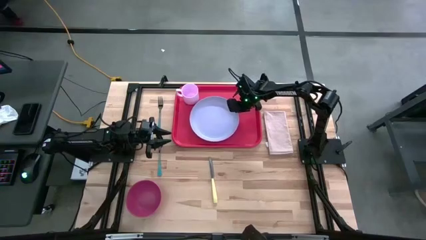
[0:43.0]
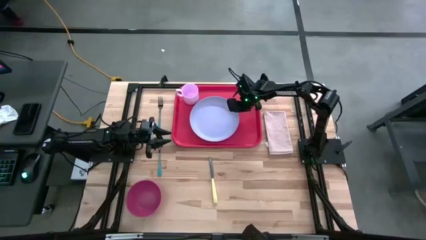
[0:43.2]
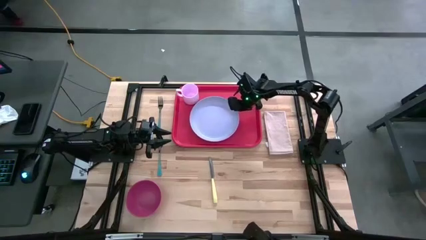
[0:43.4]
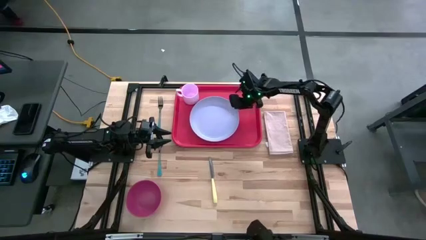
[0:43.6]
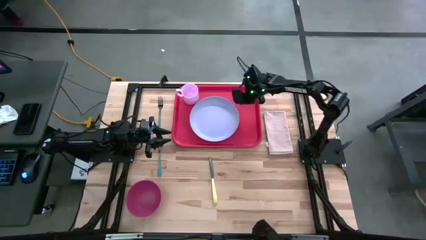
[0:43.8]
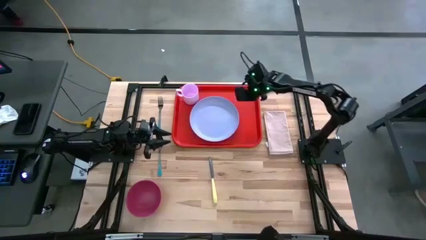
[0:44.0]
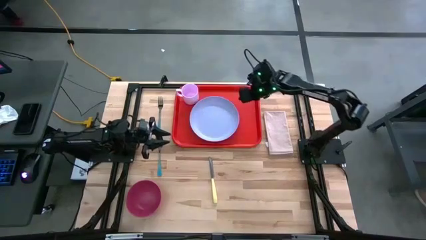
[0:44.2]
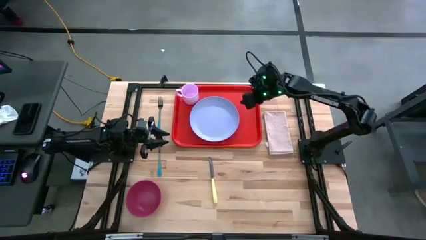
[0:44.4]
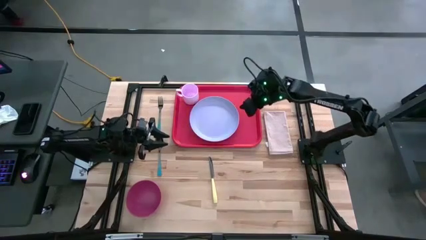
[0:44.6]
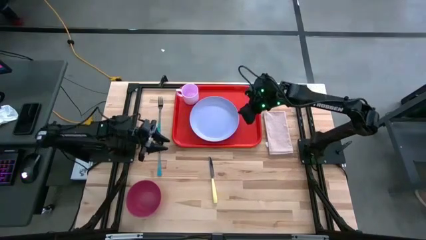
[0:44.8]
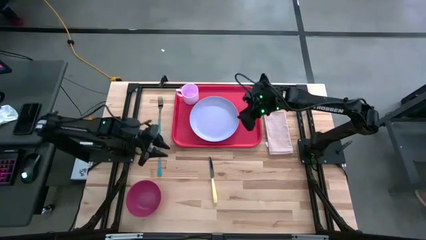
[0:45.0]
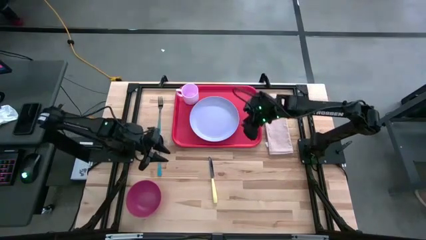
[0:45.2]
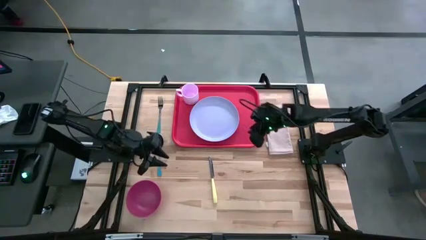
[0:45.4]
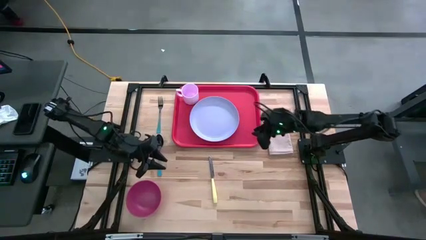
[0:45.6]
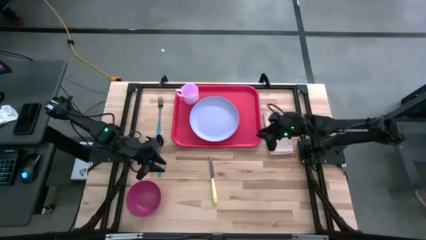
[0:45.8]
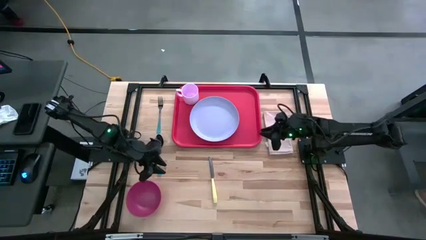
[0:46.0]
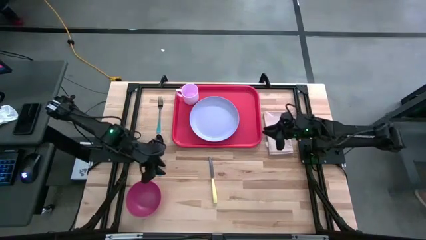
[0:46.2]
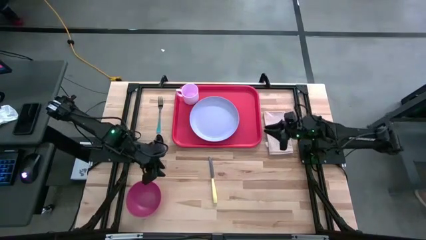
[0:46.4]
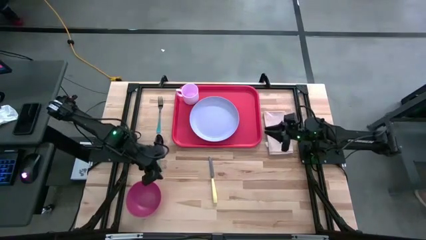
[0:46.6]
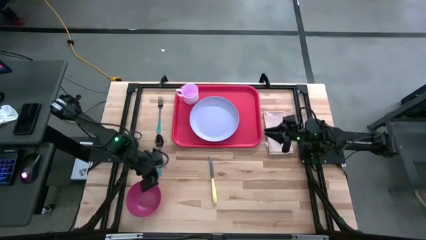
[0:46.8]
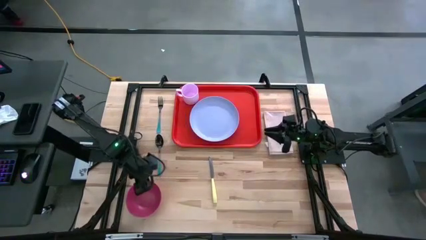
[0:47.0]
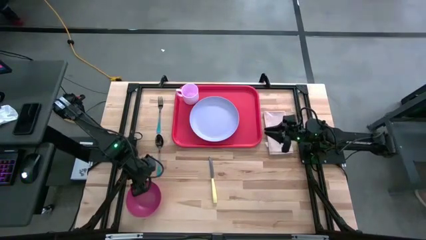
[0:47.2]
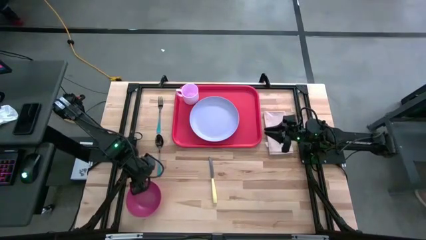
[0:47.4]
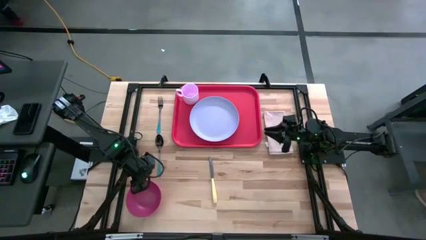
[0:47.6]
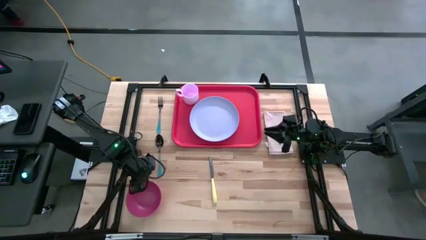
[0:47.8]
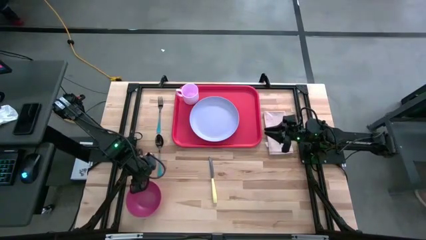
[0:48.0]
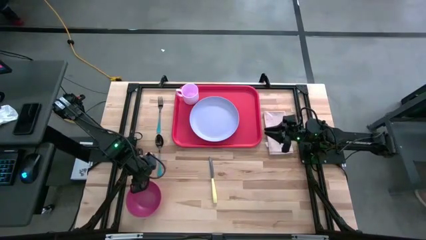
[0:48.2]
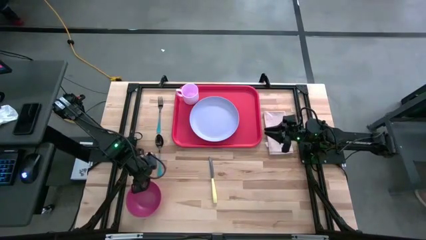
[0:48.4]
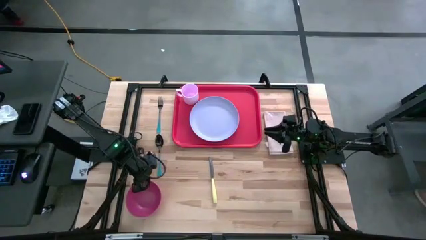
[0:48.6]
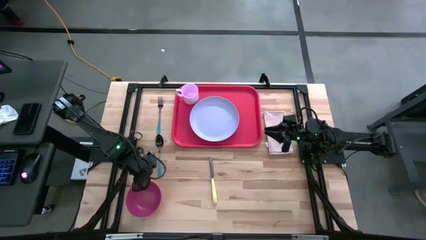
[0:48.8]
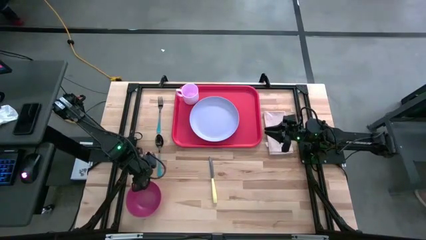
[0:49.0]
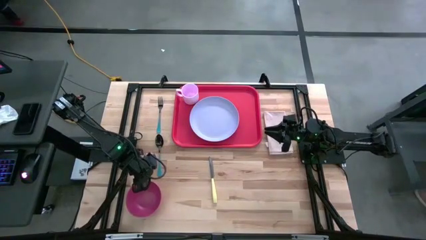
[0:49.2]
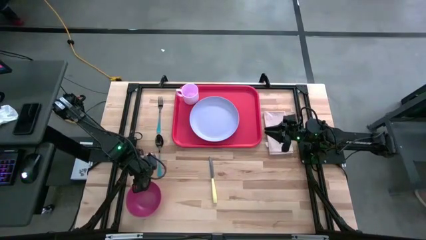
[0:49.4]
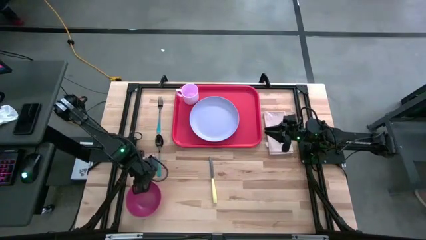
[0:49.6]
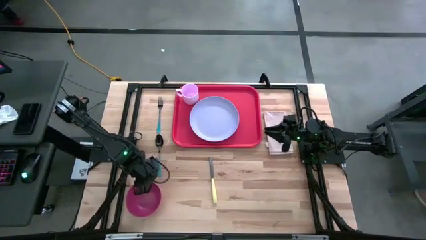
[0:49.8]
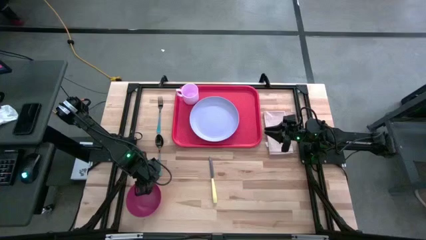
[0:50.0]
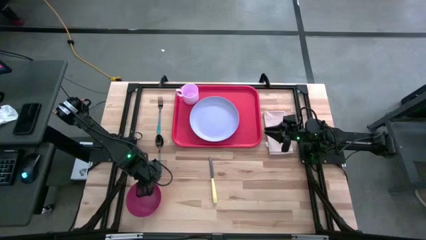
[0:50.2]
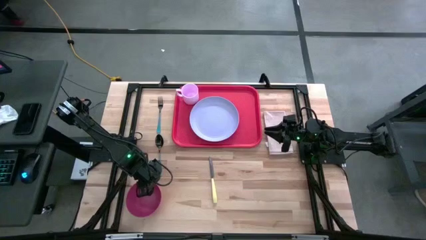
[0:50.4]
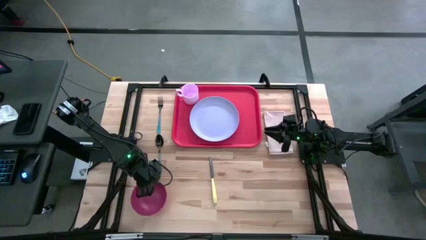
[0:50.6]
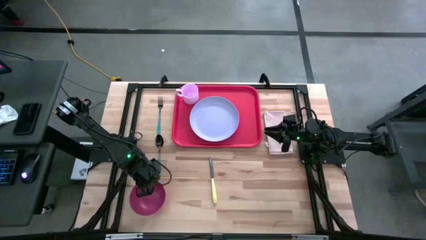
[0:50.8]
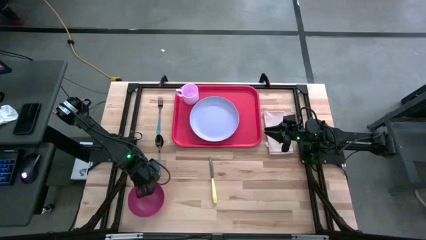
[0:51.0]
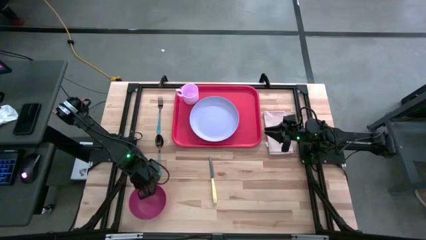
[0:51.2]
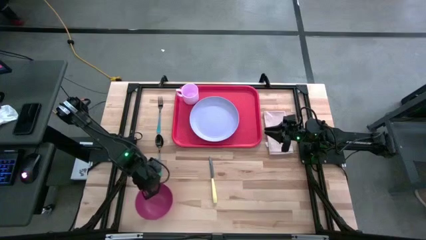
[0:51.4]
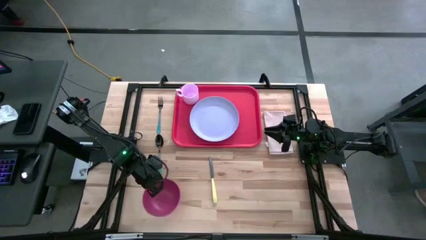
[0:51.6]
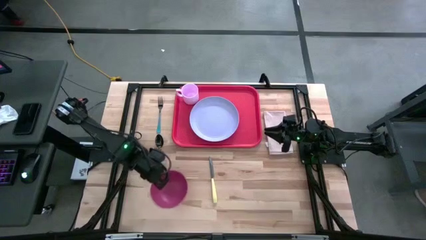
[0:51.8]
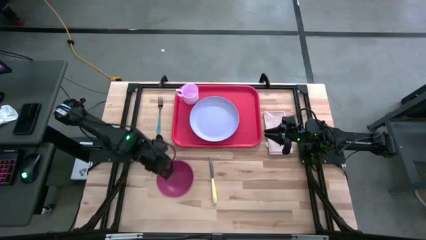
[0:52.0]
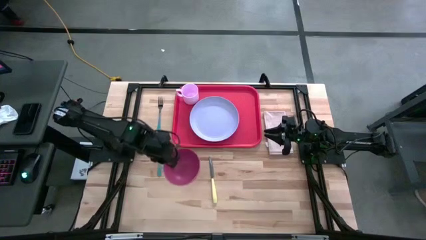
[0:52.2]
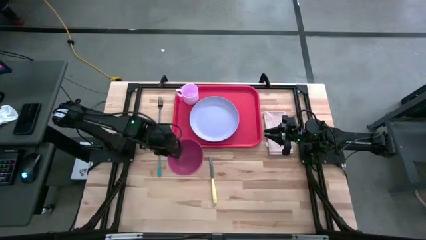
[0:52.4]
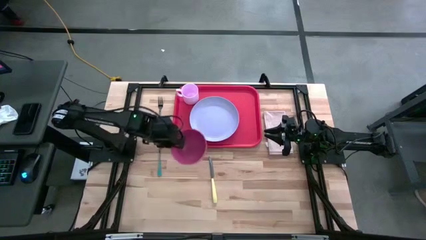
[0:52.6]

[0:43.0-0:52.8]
Task: Set up tray
Put the pink bowl on the white plate

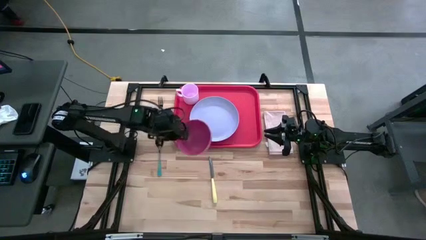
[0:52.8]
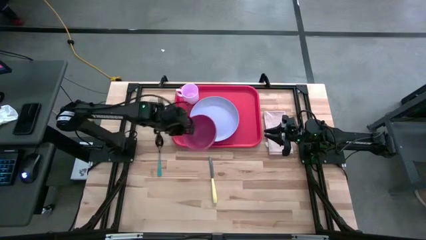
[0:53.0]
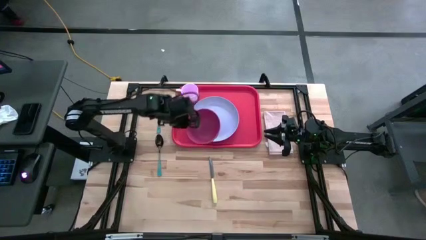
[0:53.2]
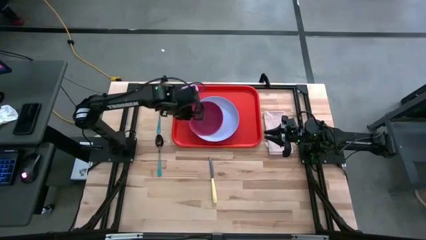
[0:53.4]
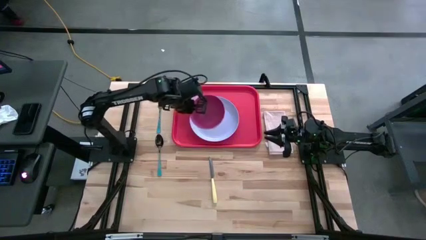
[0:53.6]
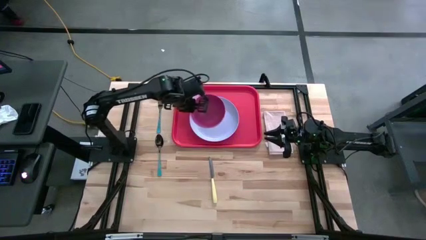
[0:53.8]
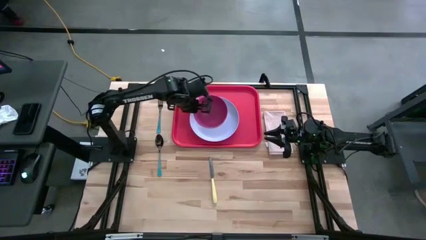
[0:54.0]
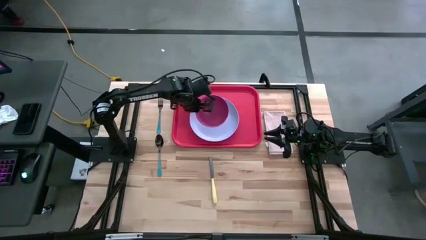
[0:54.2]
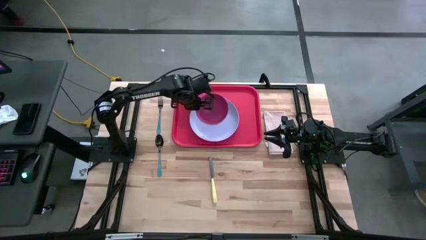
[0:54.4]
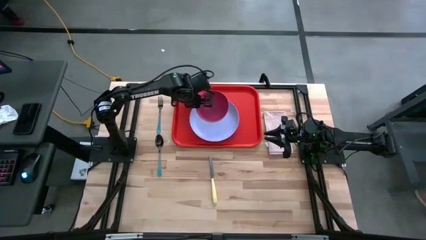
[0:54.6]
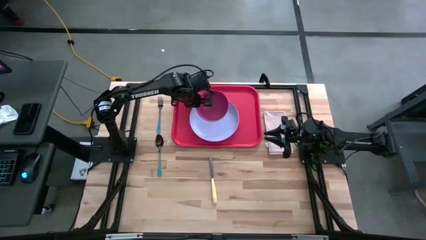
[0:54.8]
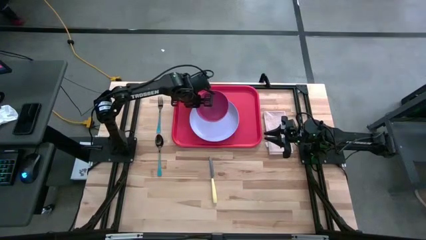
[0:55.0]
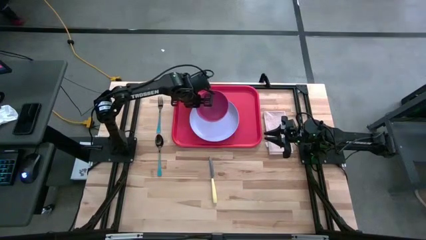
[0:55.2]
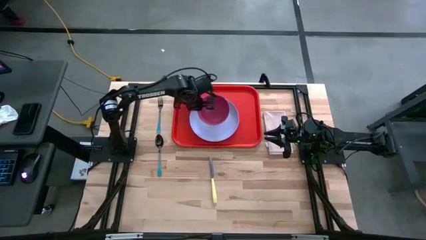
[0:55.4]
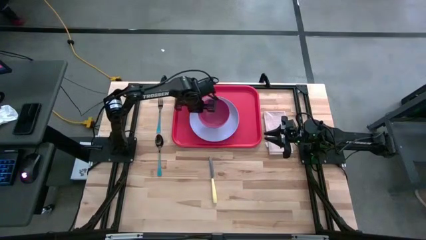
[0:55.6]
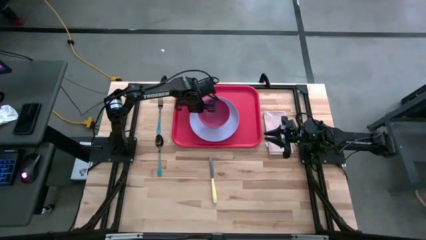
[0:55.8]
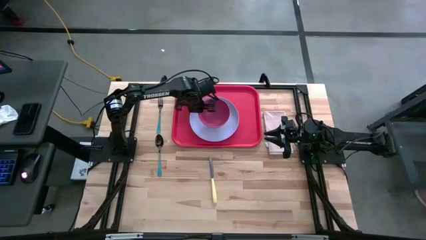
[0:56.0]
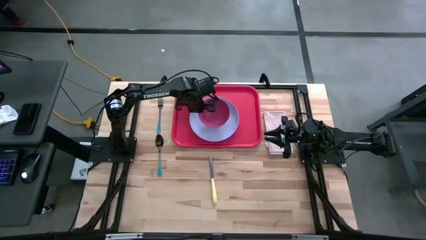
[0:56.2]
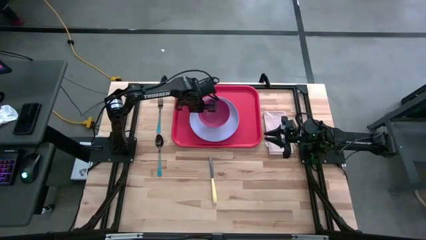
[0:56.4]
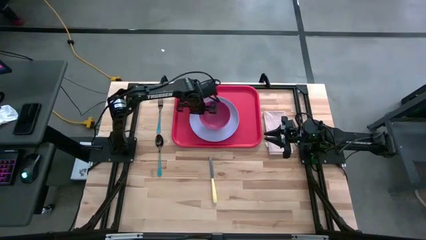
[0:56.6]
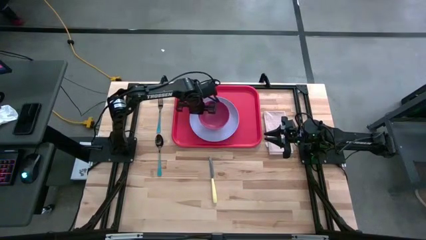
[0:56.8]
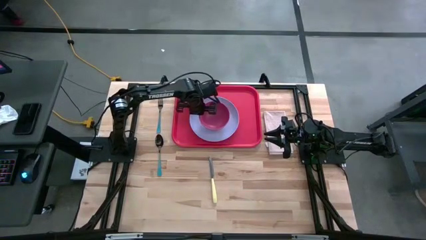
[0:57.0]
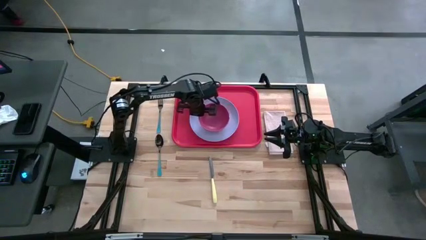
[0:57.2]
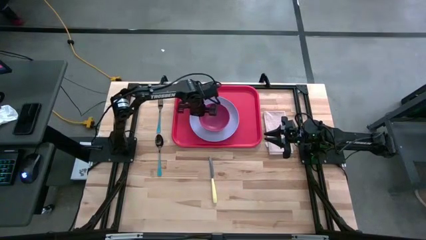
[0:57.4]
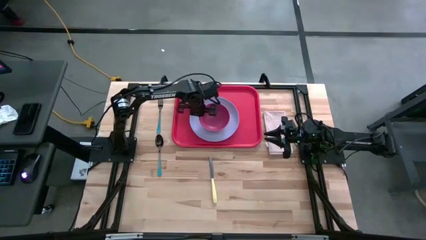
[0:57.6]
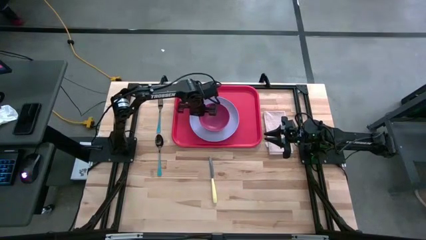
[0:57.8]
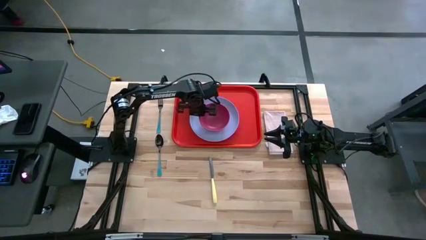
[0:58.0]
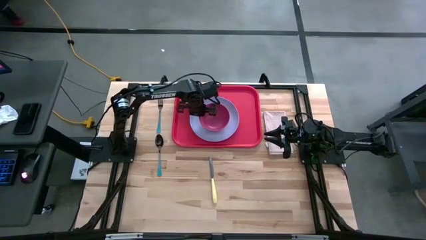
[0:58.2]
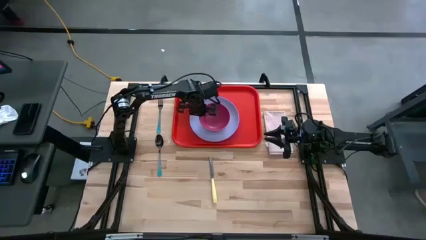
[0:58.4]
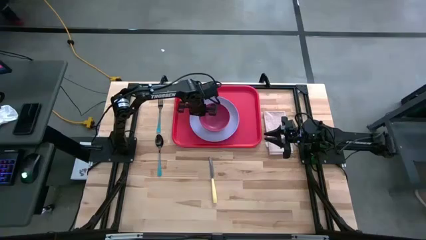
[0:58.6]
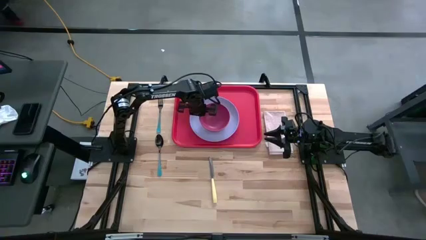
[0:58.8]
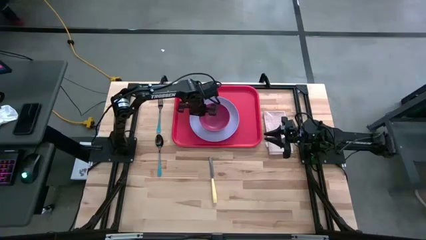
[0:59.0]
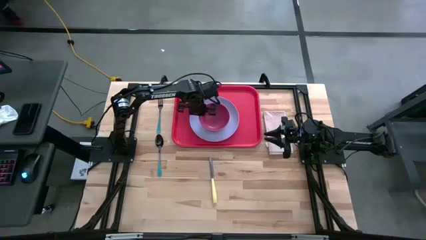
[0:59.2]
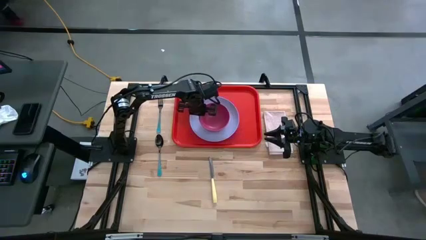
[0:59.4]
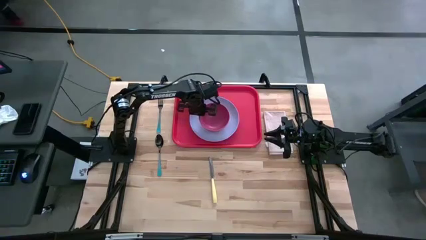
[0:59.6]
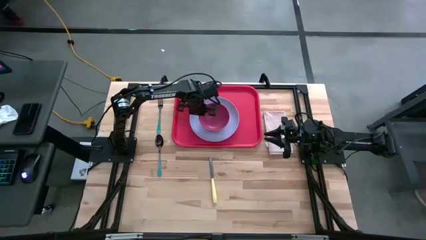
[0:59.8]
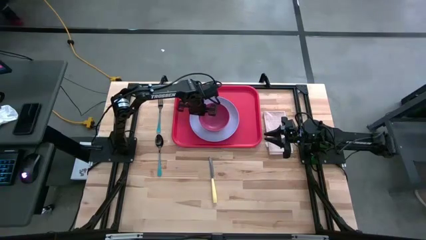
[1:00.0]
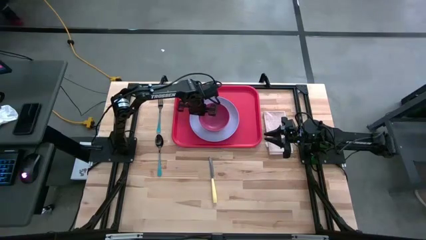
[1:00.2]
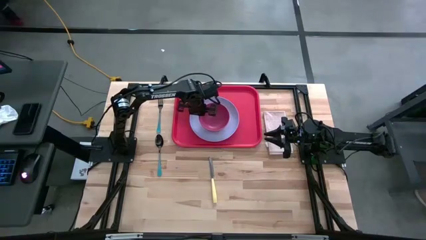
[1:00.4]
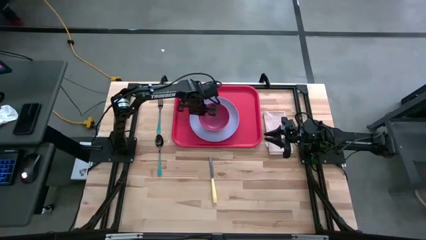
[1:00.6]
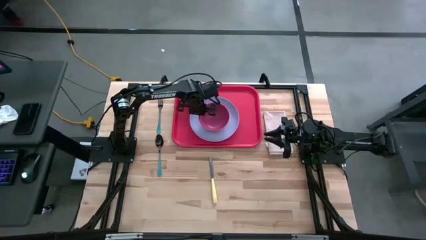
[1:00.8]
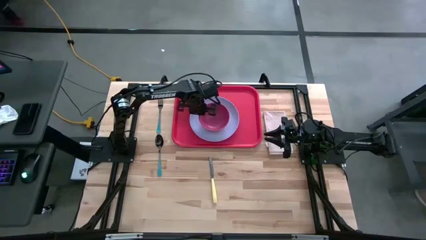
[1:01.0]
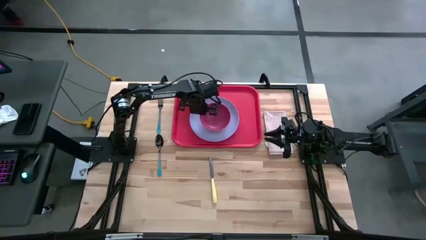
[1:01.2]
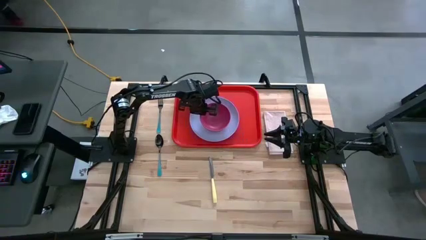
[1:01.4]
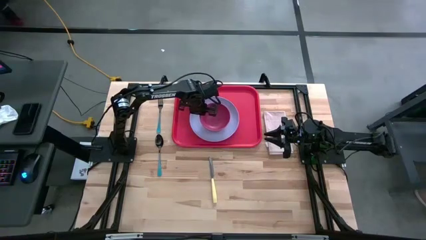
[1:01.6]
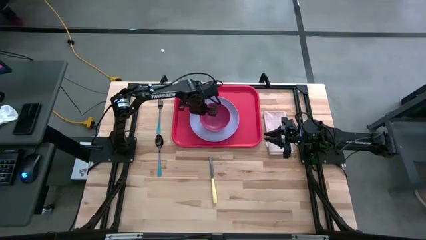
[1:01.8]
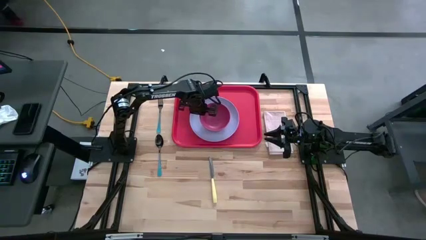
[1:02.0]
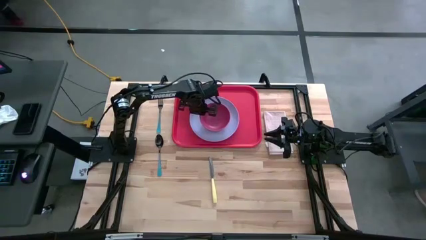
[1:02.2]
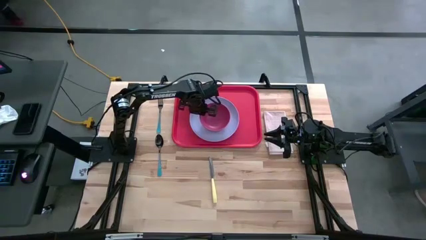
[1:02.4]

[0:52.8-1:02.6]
Put the pink bowl on the white plate
